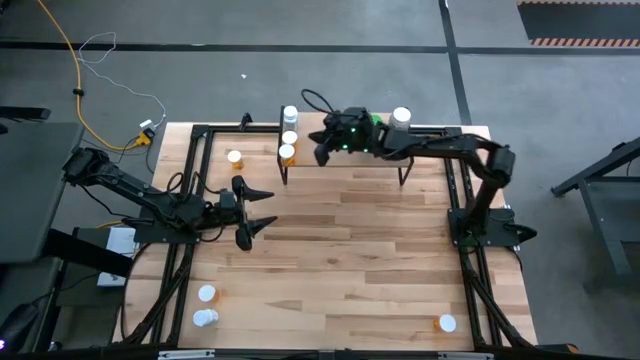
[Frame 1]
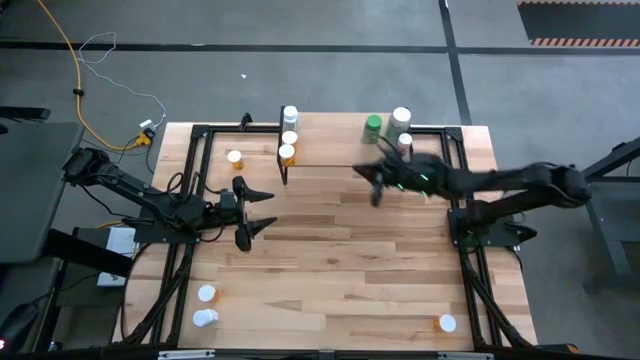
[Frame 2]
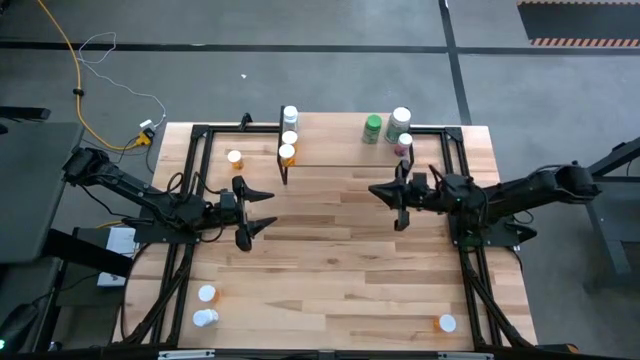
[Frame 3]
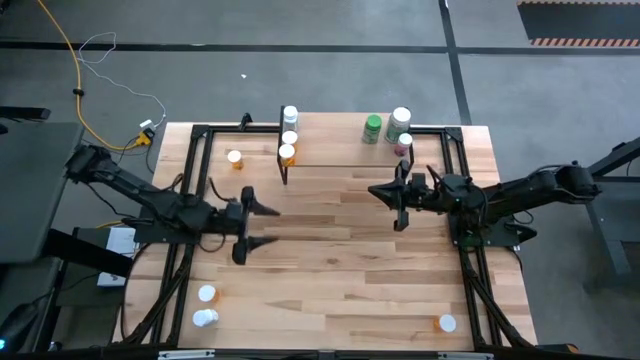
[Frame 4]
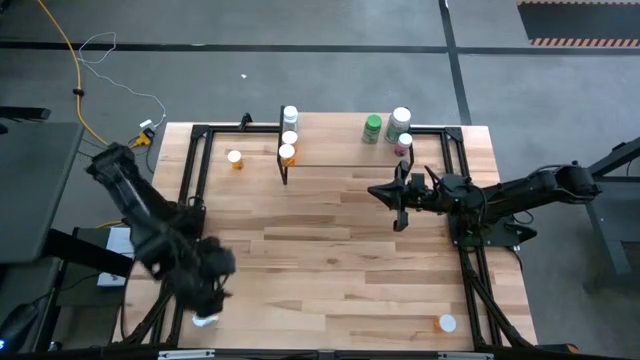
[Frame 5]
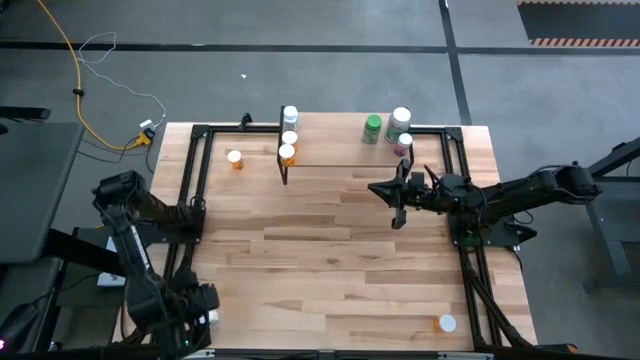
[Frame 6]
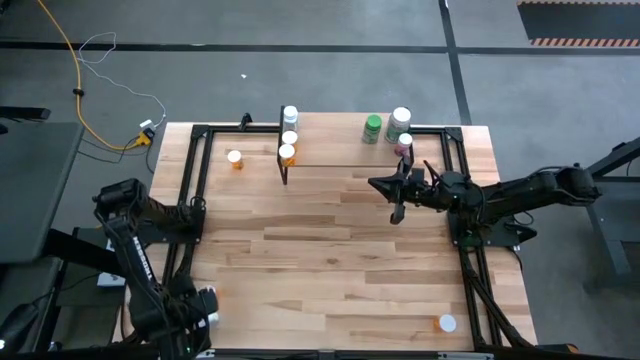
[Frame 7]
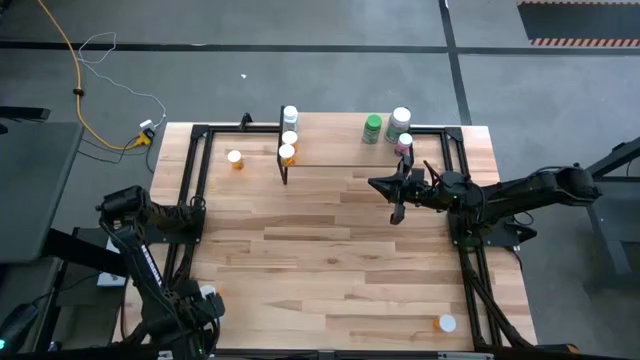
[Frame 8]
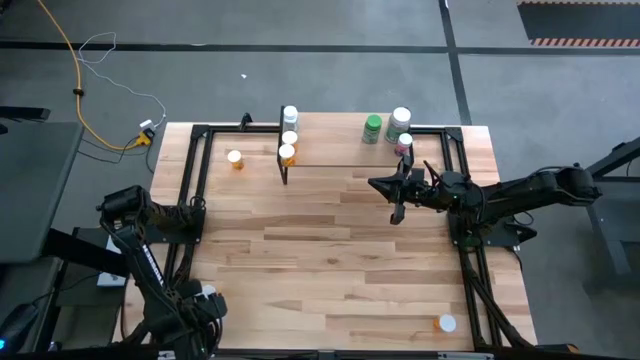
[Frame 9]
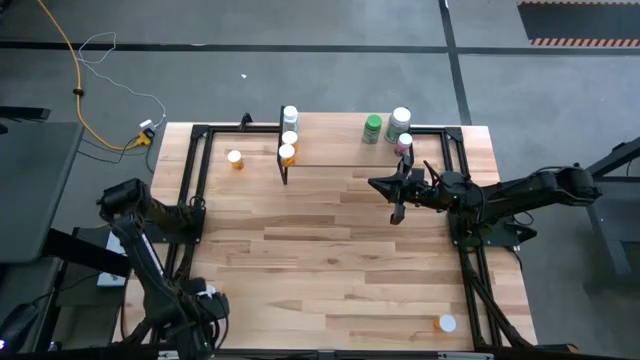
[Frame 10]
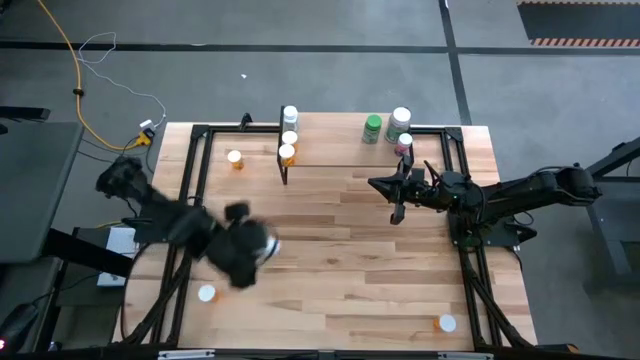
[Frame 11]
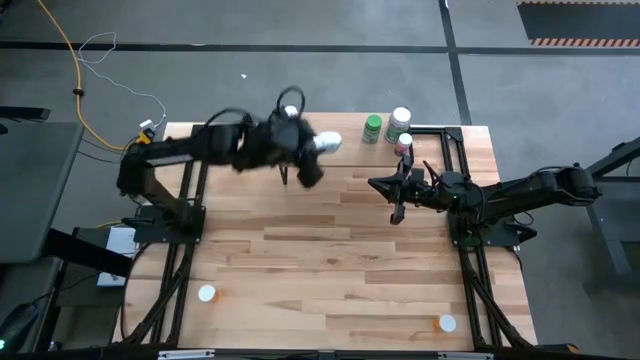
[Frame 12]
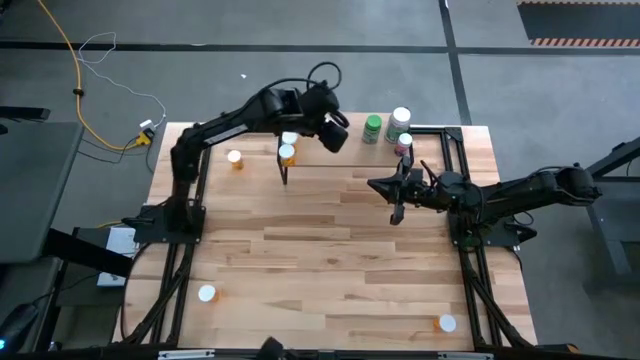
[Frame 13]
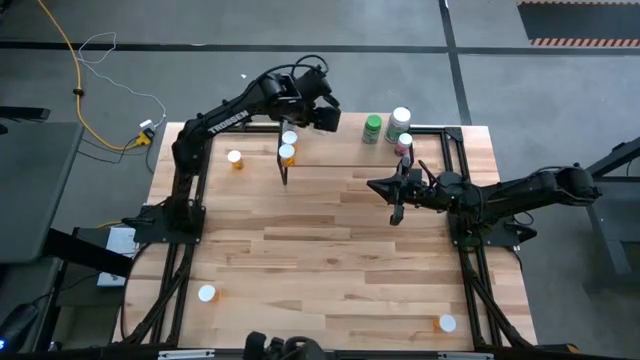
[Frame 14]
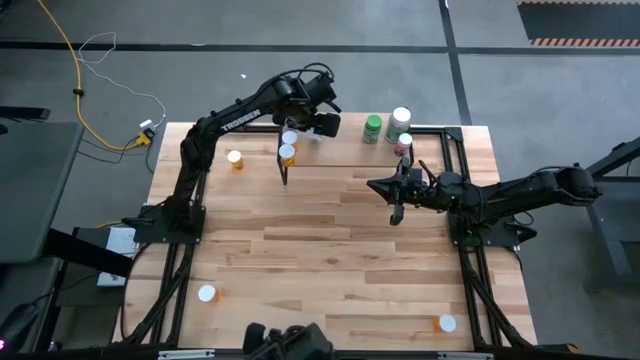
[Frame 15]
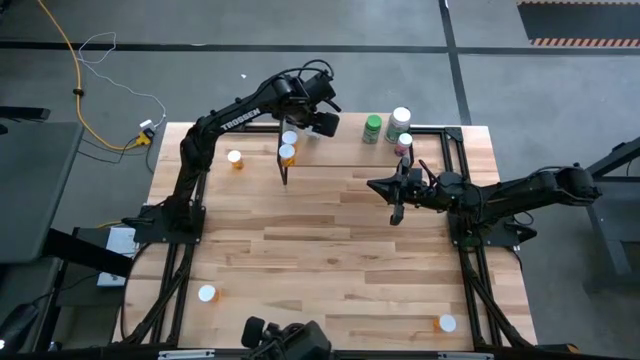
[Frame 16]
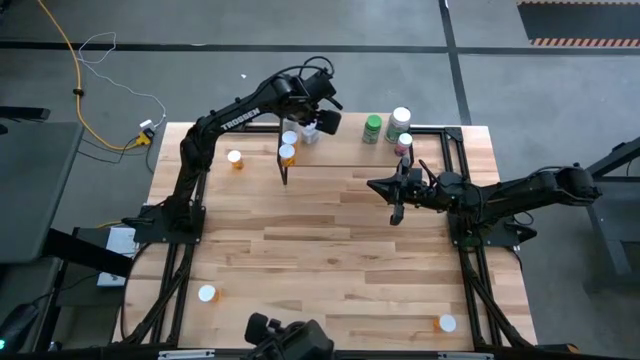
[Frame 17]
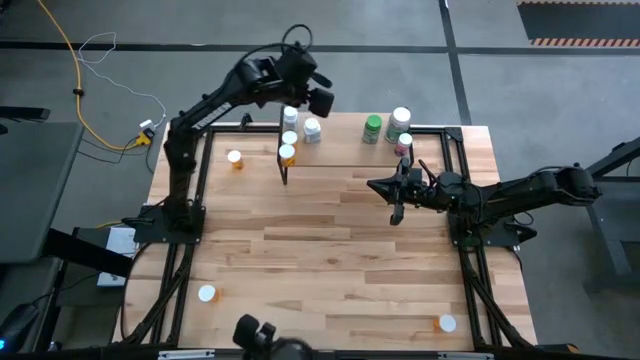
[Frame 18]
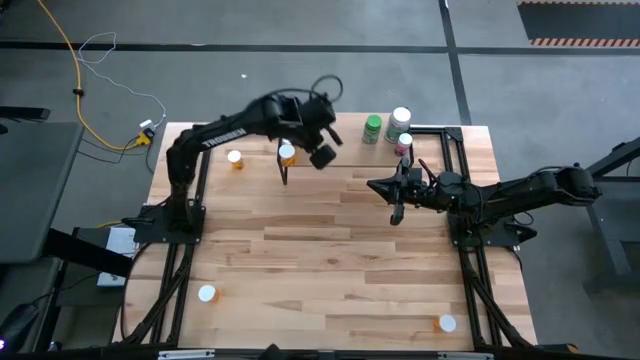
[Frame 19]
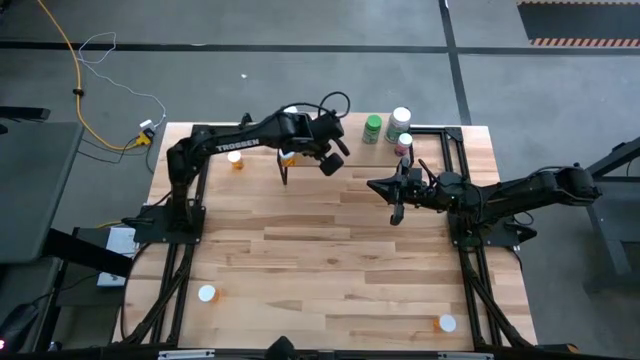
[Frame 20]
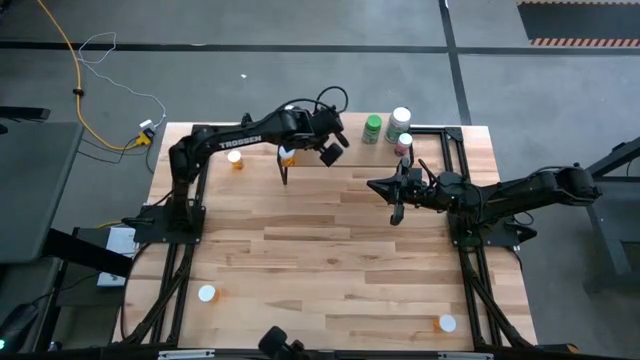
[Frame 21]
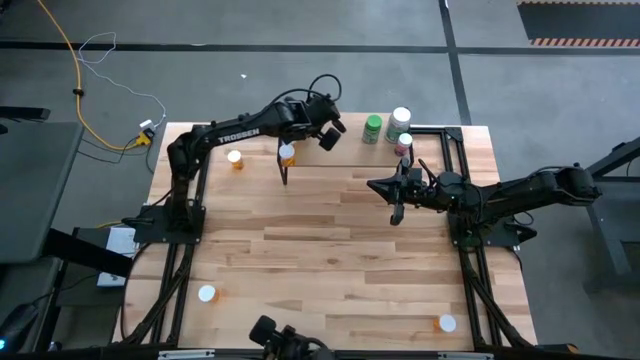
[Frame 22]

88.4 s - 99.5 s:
Task: Pick and place medicine bottles onto shelf by color
Put the blue pill bottle on the shelf

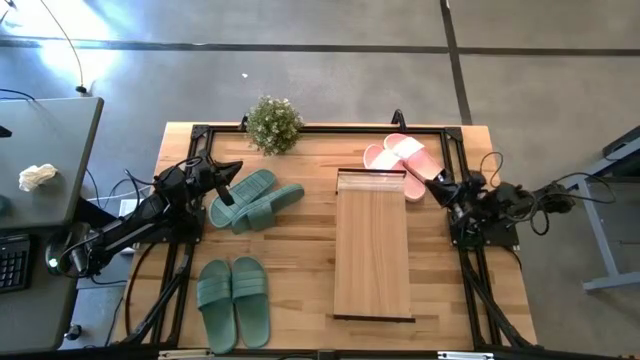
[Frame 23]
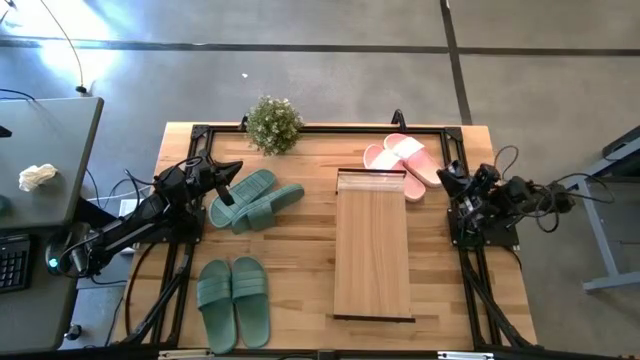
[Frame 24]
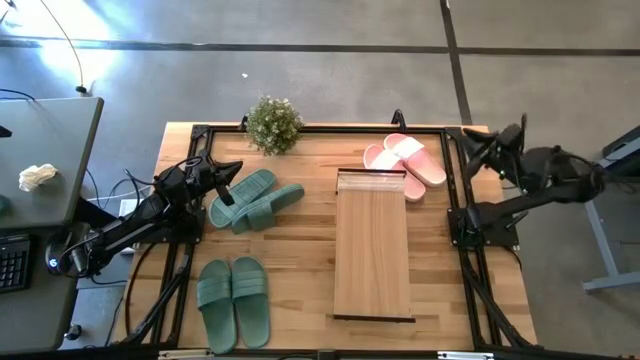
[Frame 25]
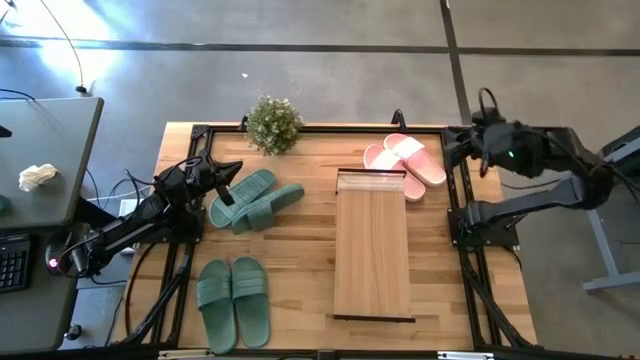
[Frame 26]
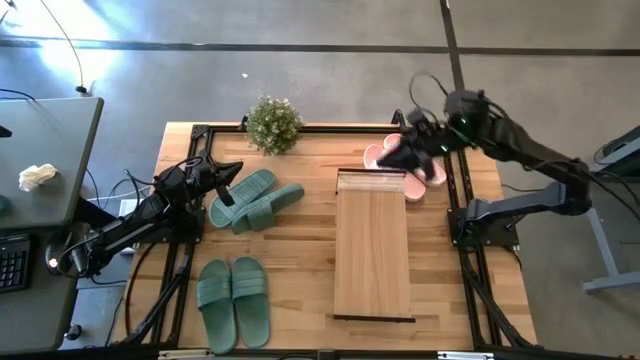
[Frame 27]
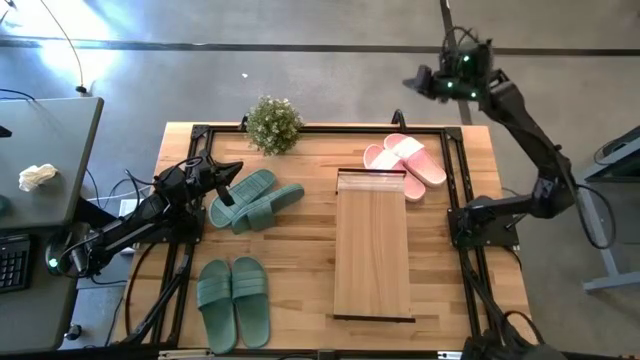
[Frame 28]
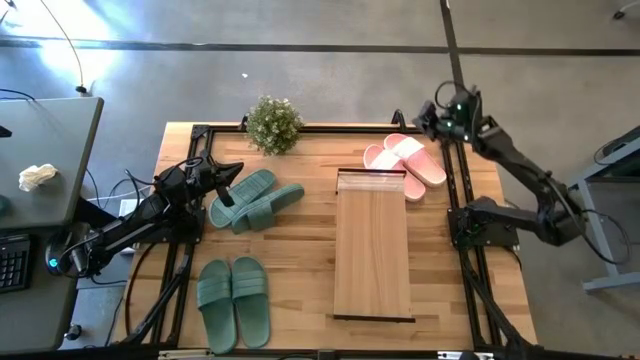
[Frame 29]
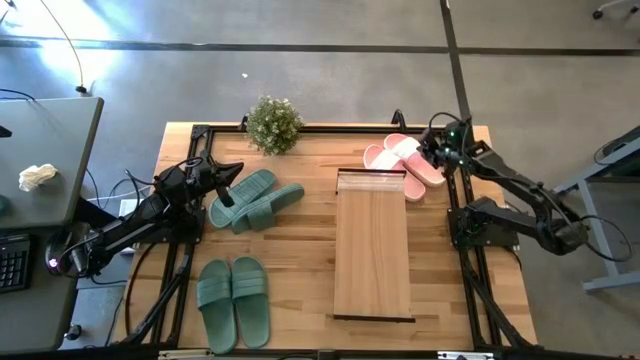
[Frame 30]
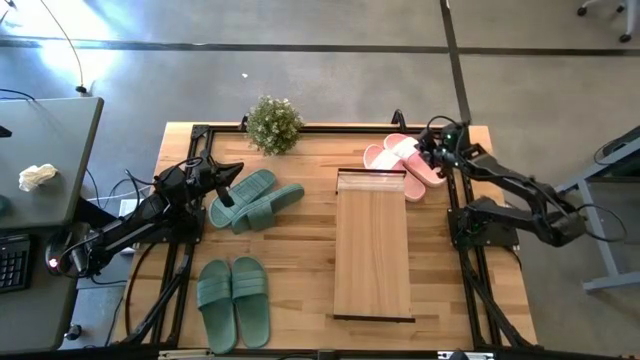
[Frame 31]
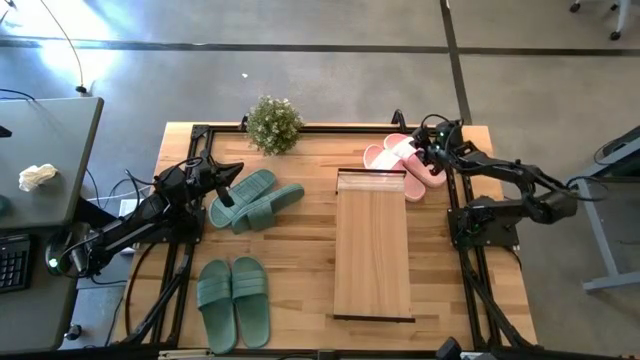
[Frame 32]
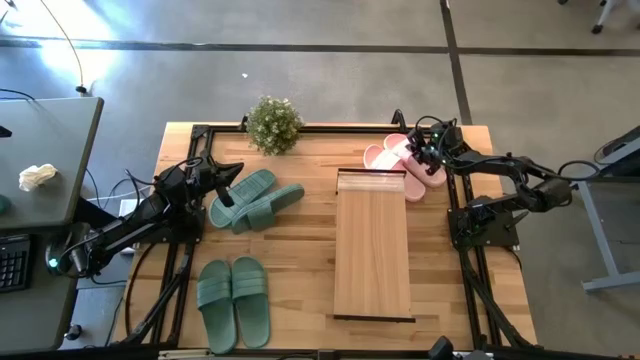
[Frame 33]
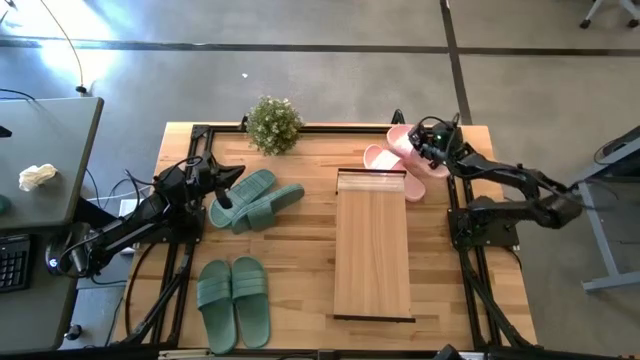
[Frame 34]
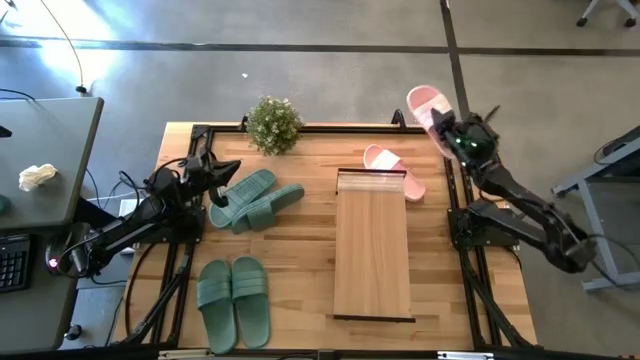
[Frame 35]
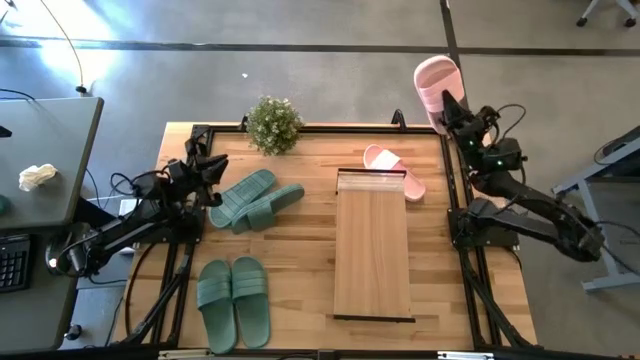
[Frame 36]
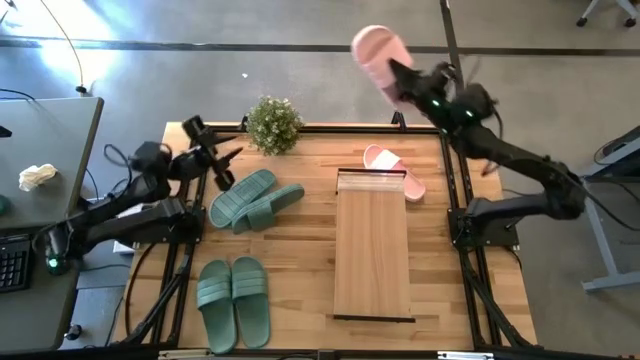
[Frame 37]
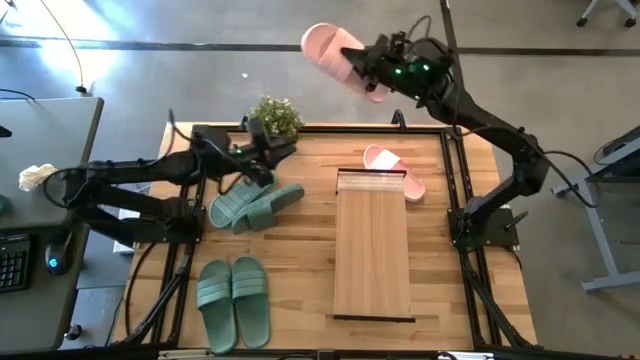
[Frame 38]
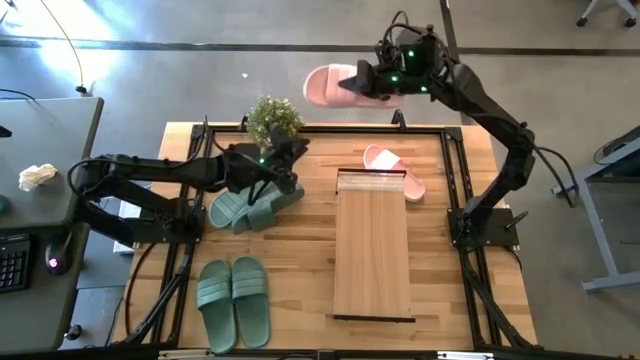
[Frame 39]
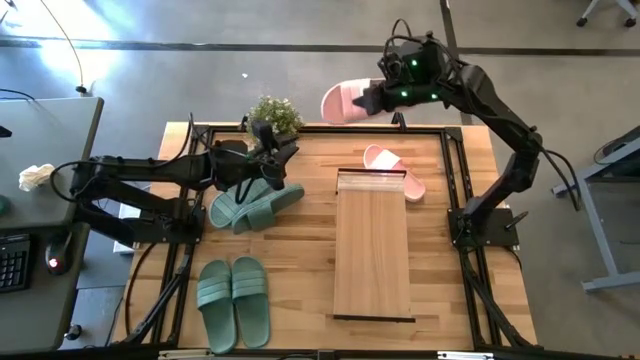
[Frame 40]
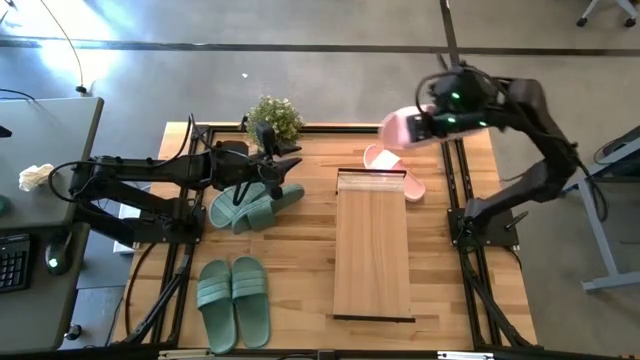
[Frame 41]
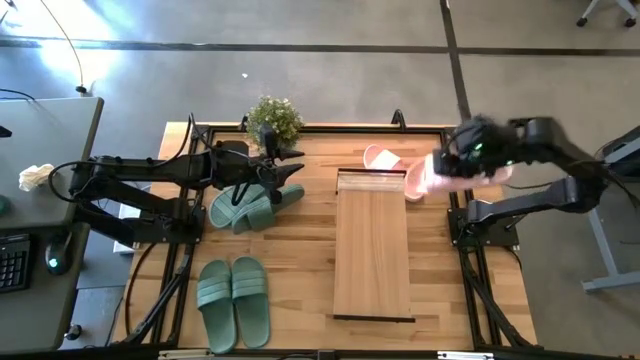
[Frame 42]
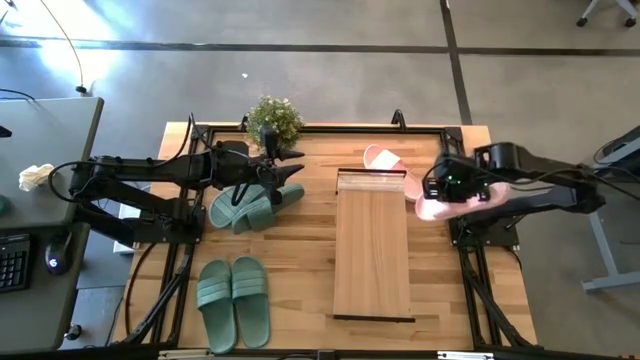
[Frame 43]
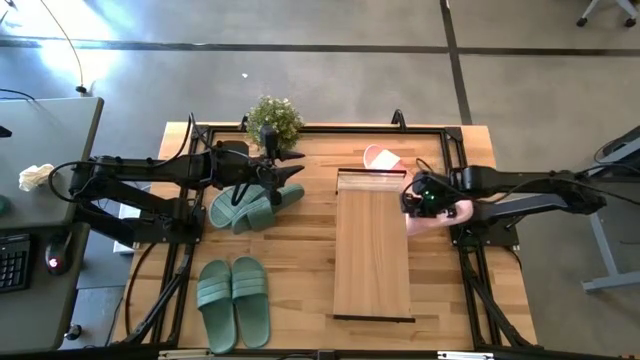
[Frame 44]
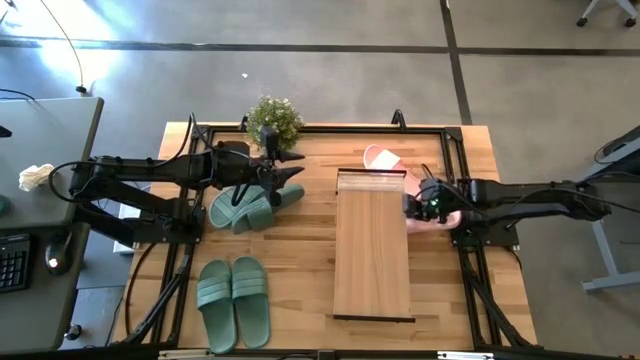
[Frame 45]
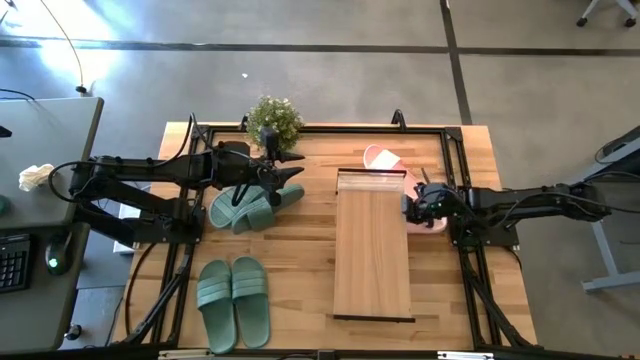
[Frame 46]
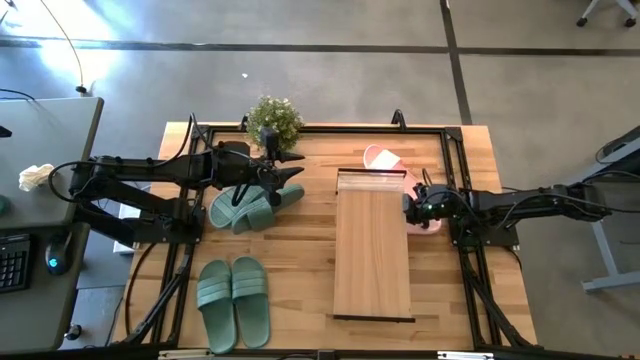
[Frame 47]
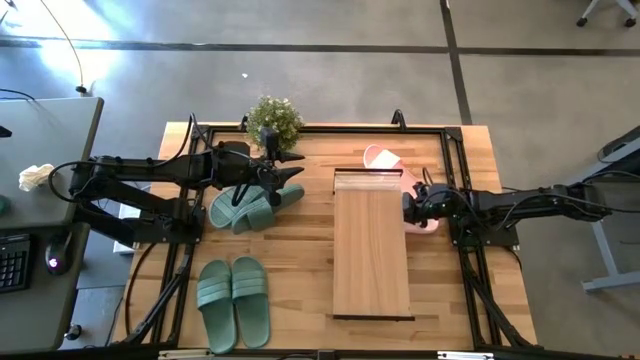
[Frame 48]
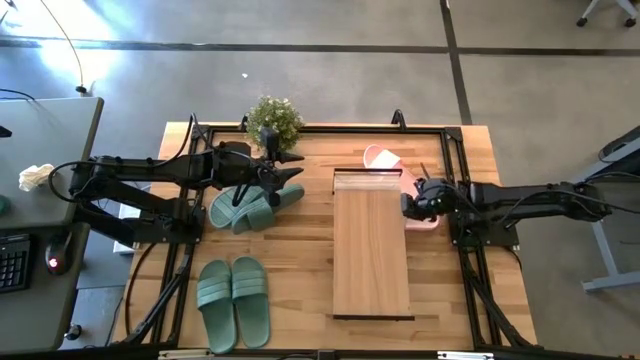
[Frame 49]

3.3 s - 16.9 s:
Task: Pick and place slides into the shelf
Put the top pink slipper under the shelf
